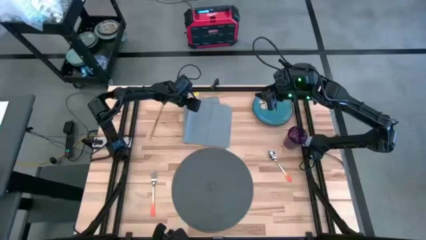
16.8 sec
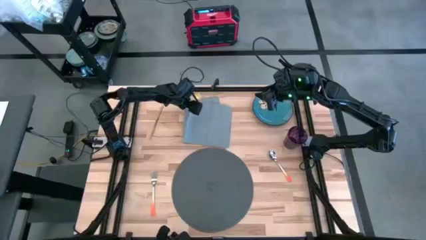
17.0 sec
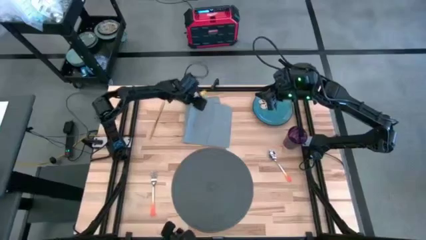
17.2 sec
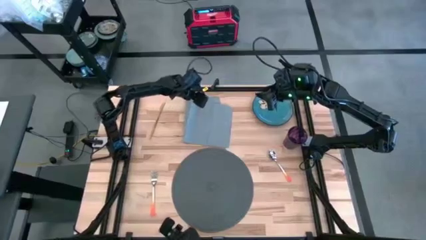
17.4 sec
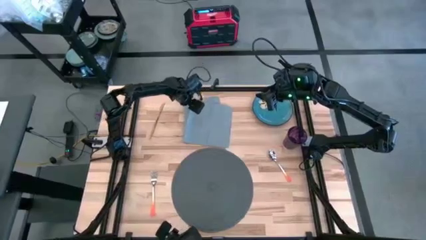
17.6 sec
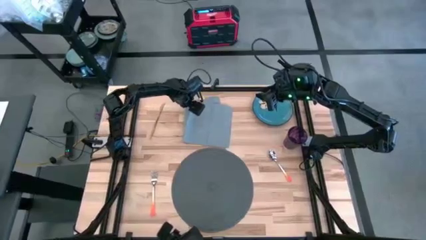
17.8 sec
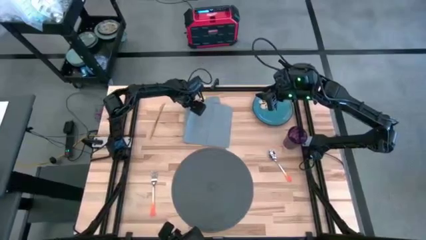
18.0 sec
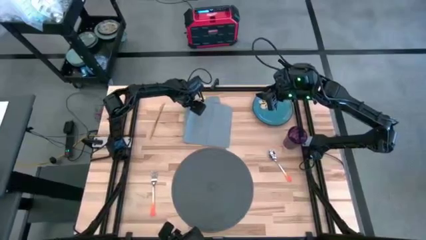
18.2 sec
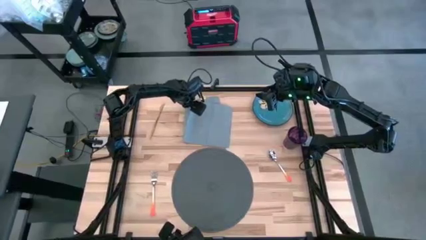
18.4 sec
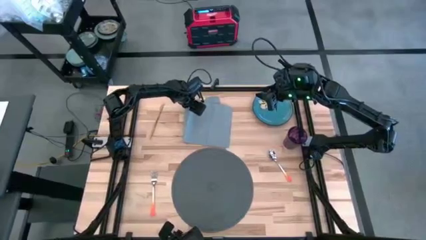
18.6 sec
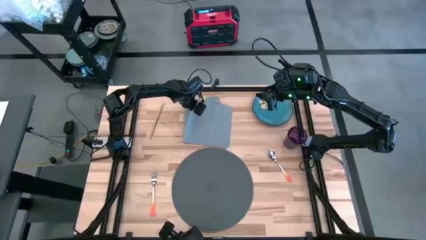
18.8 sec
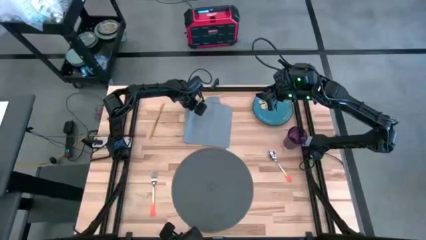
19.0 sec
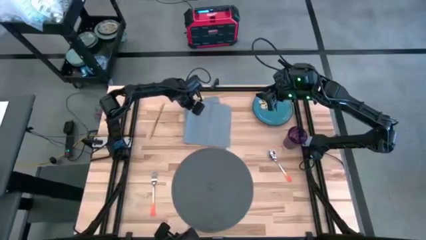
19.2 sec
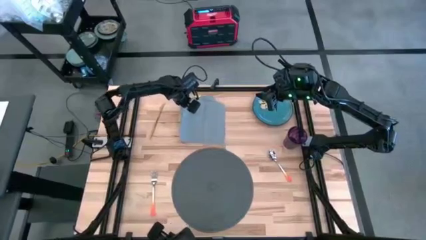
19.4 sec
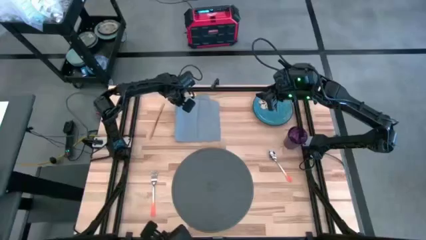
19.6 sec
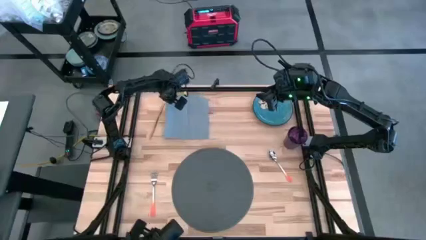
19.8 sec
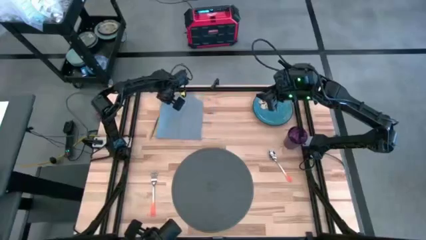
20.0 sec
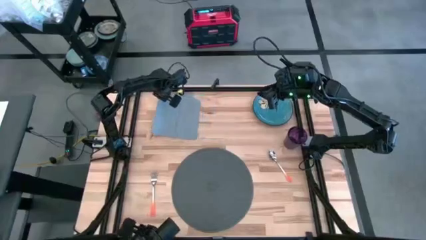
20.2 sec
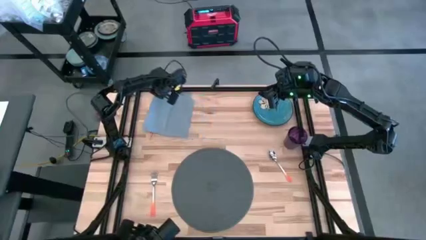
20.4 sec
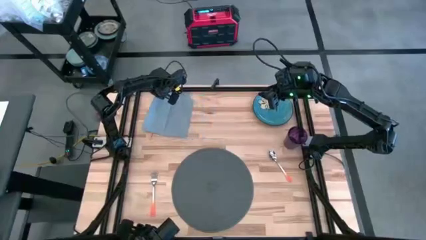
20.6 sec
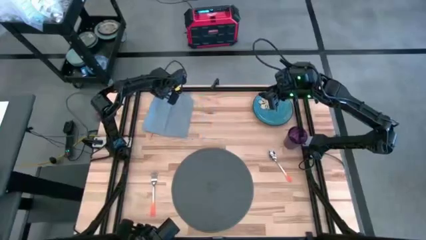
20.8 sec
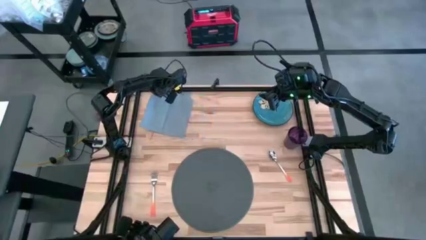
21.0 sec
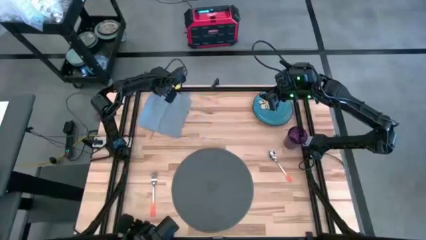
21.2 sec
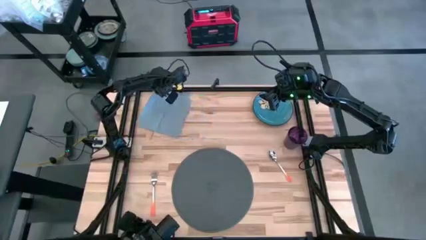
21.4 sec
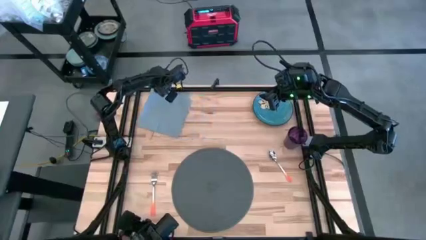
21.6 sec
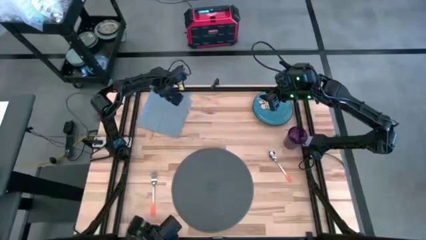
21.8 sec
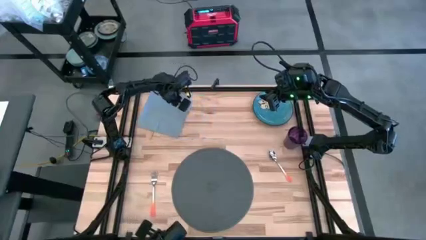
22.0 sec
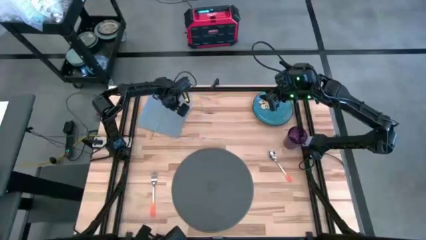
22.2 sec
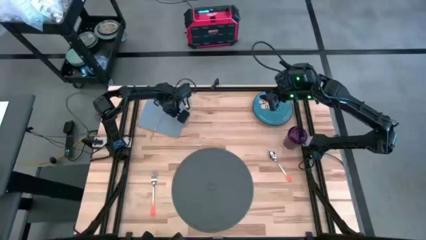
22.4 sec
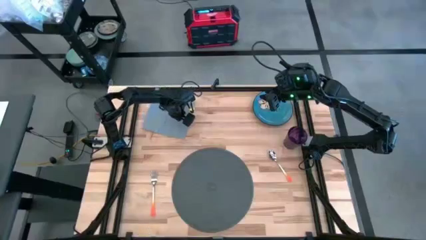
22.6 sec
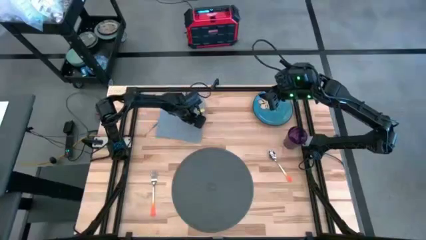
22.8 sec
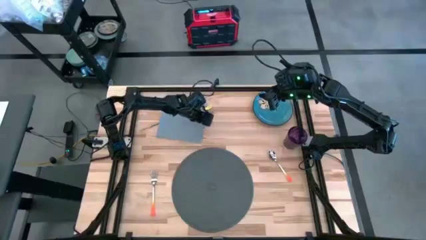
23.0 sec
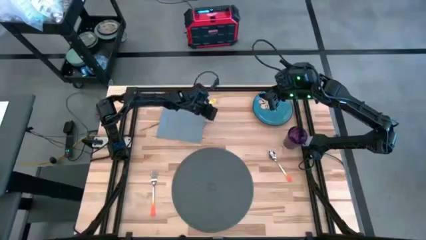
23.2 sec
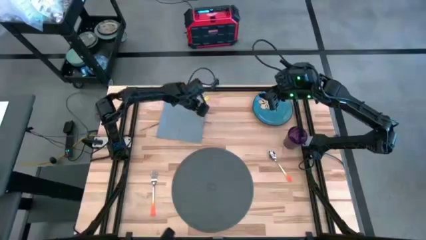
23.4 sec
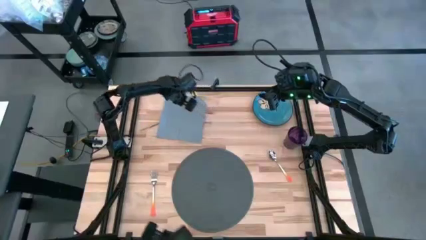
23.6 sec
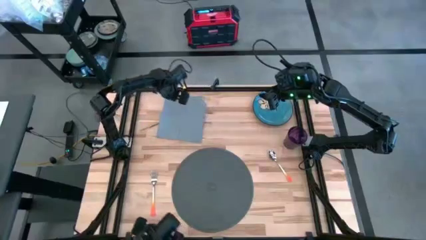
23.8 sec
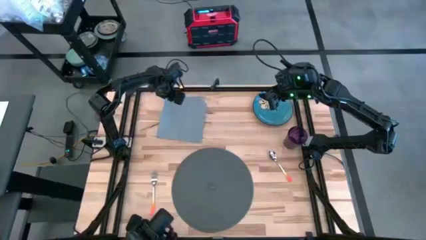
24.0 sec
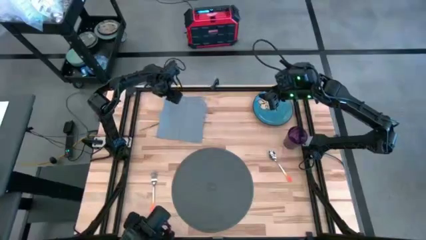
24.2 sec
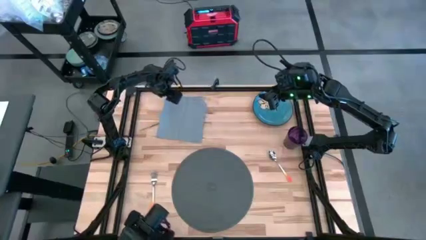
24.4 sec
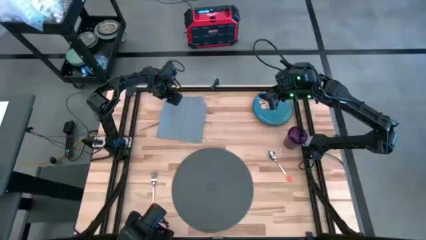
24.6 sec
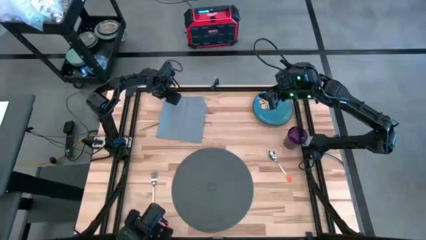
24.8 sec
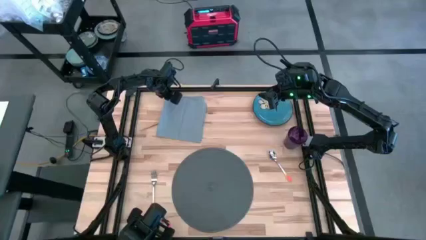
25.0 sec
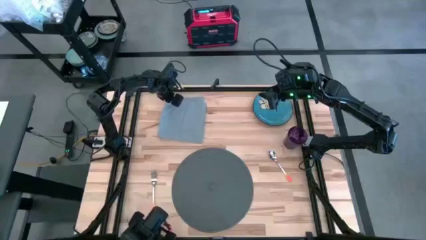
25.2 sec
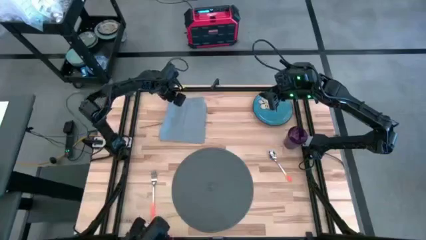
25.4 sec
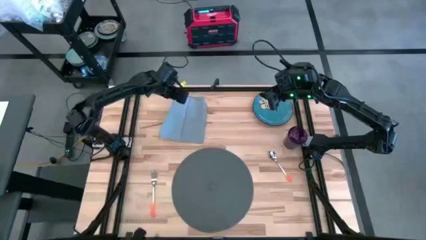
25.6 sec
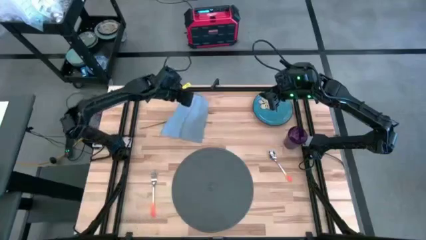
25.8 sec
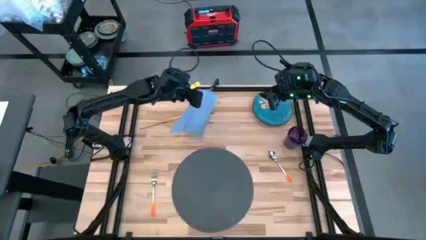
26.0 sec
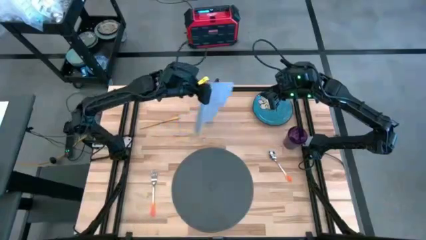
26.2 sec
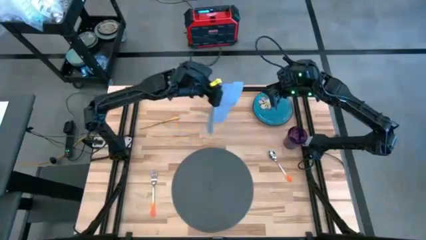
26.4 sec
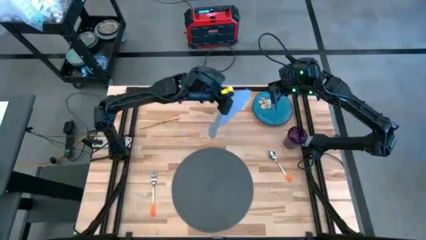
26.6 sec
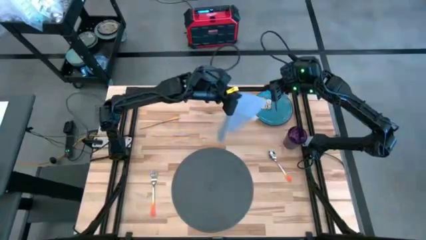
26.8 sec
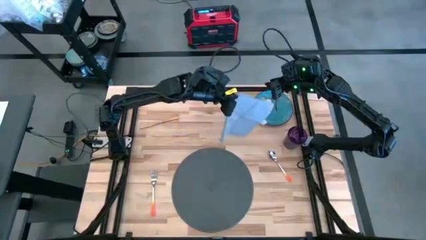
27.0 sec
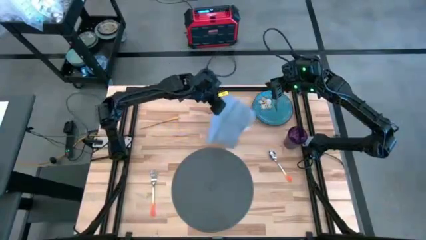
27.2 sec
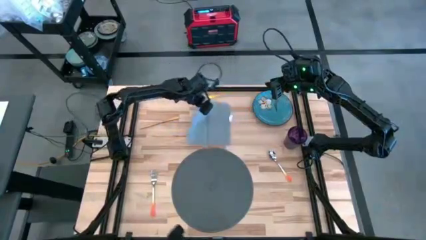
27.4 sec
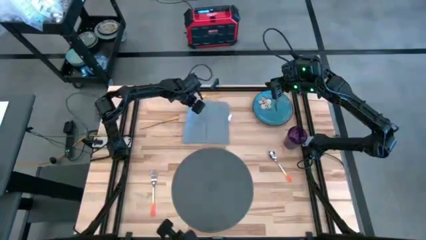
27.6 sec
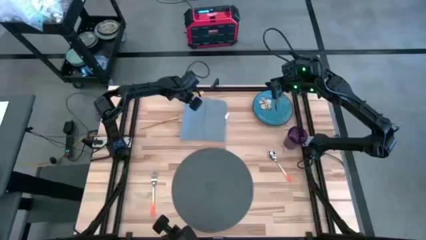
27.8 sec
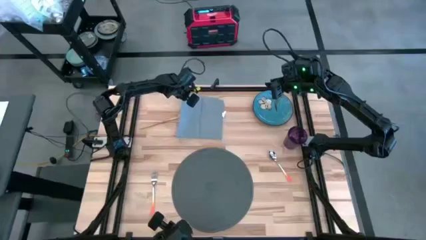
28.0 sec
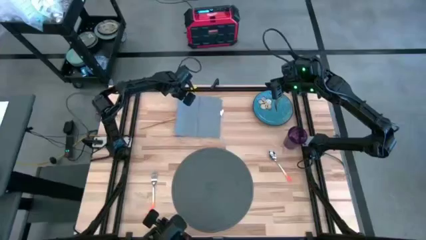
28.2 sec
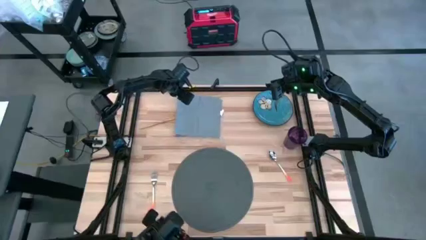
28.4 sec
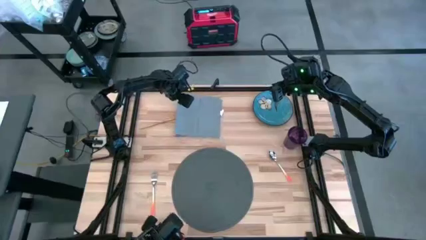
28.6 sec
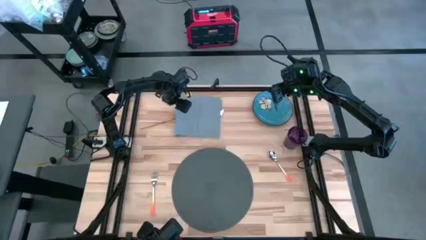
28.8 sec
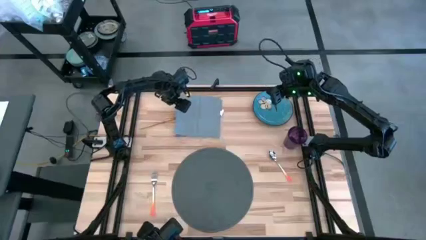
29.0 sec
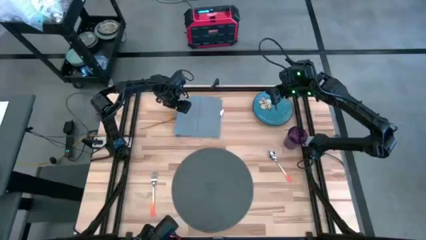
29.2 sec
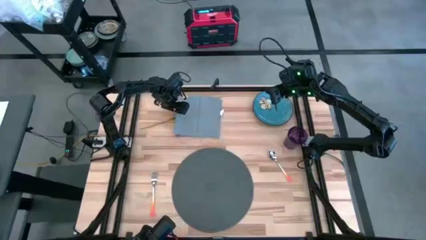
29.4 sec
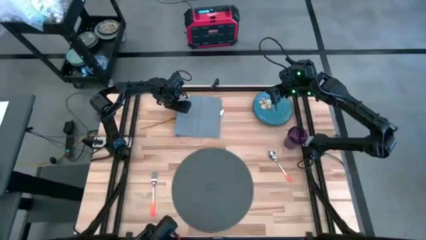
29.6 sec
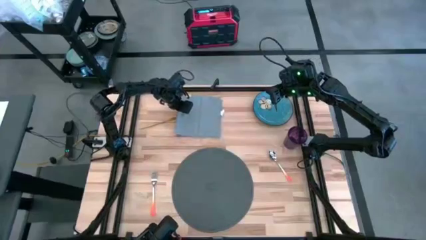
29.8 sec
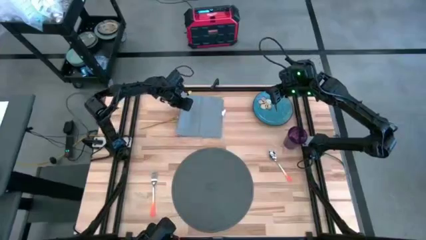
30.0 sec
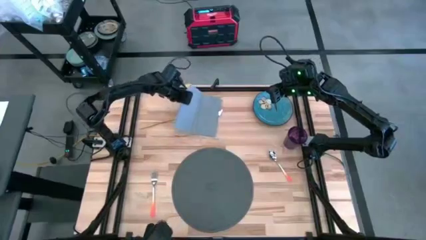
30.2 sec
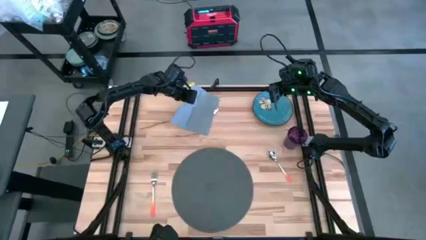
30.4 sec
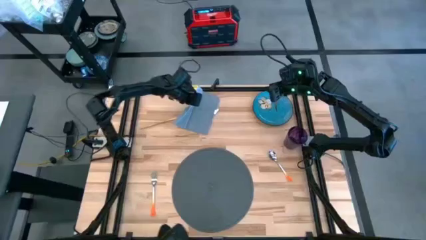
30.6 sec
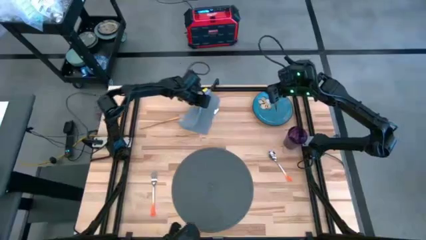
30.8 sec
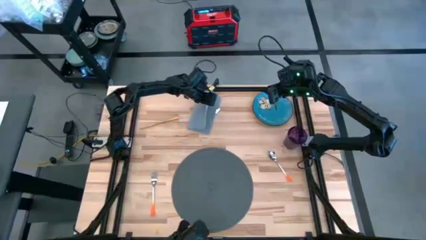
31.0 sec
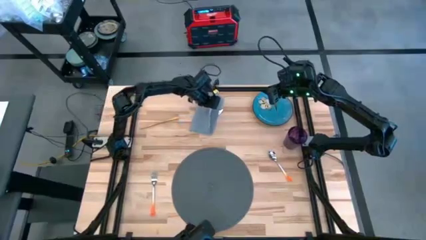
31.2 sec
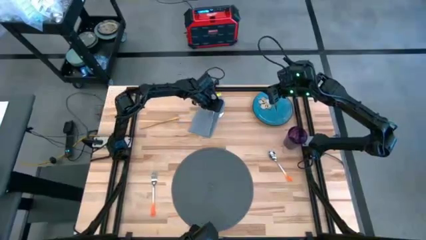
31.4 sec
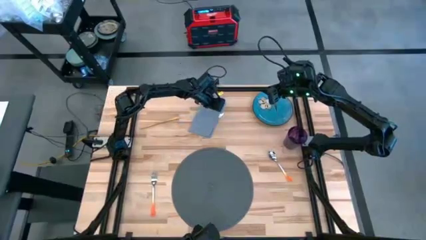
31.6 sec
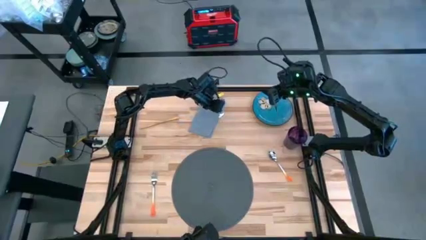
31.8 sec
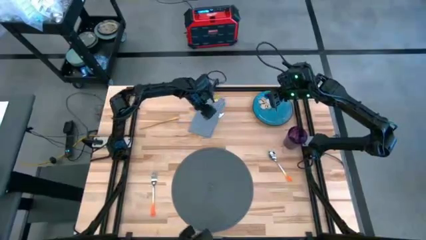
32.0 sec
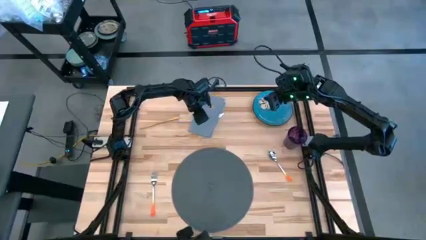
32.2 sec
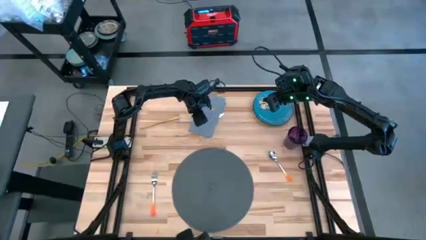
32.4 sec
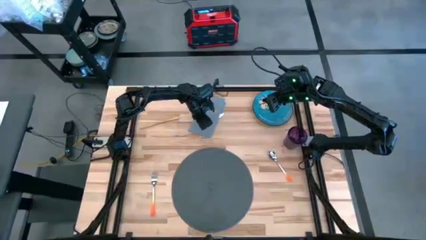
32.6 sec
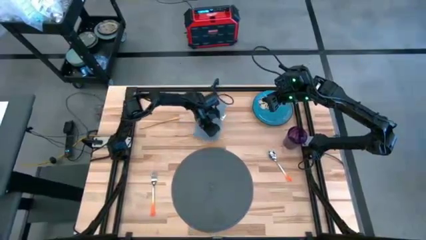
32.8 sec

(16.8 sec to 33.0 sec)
Task: Set table place
Fold the gray table napkin

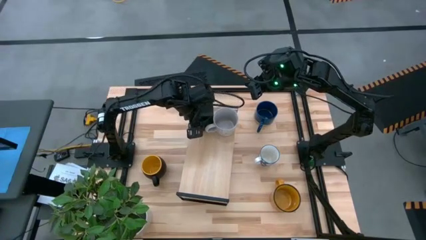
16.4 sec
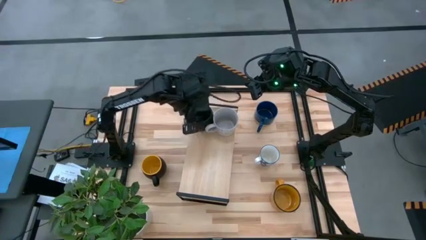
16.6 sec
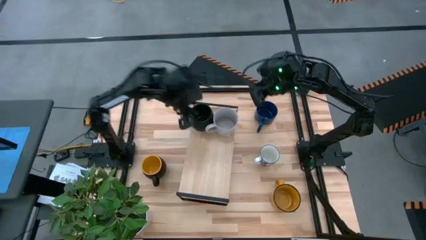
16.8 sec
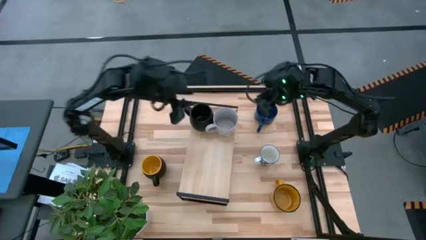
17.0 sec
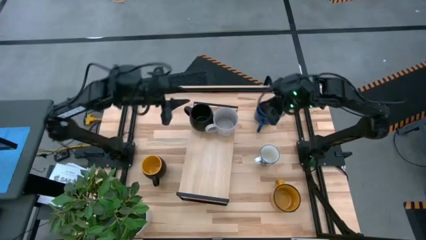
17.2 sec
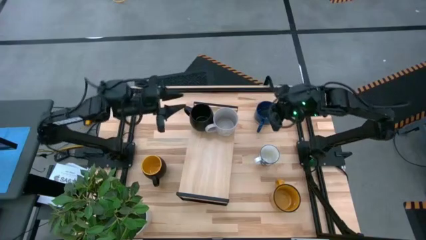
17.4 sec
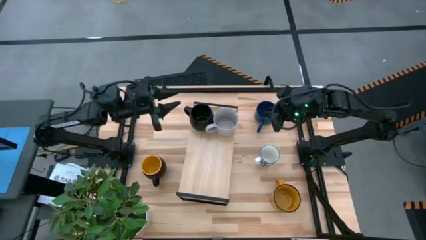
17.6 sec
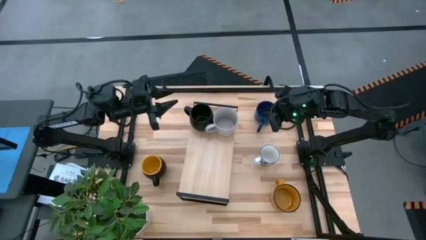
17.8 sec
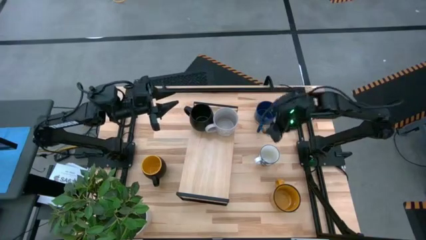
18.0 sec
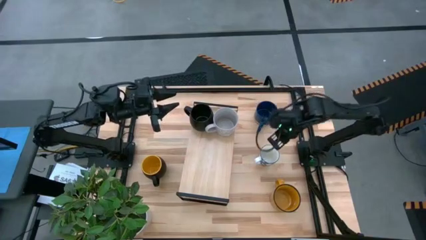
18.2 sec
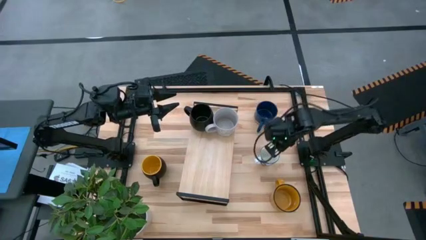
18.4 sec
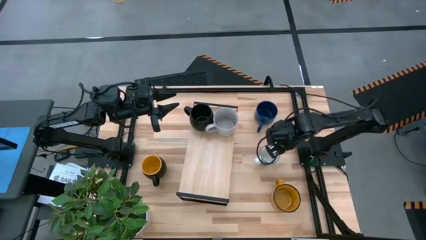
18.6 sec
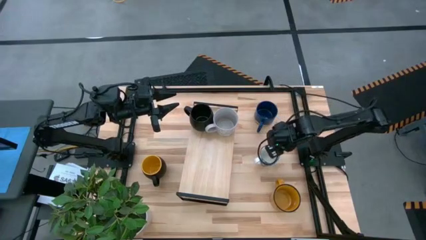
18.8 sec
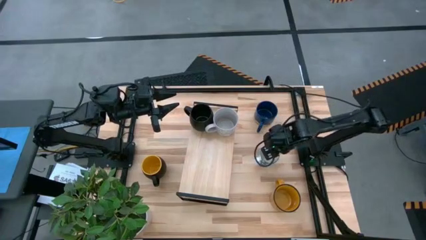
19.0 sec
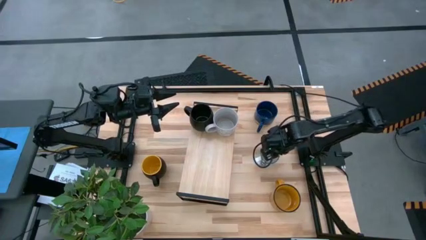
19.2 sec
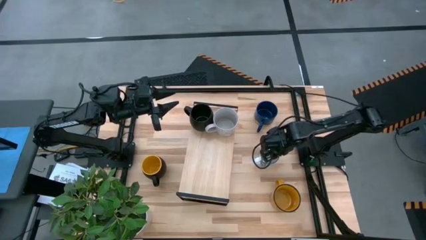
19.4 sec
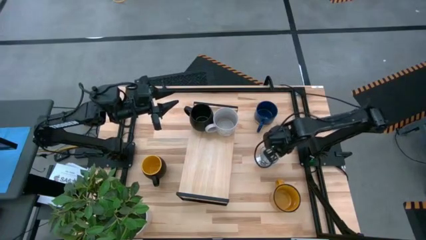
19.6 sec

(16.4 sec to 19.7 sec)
Task: Place coffee mugs
Put the blue patterned mug on the shelf
